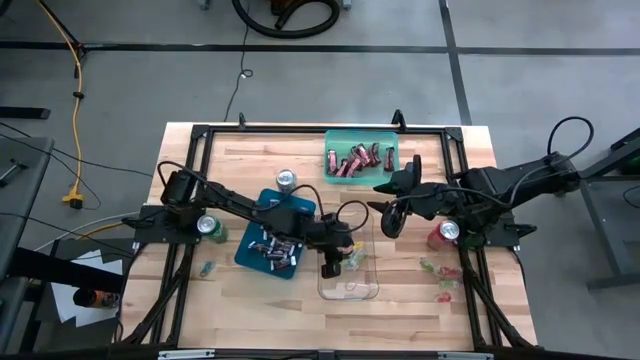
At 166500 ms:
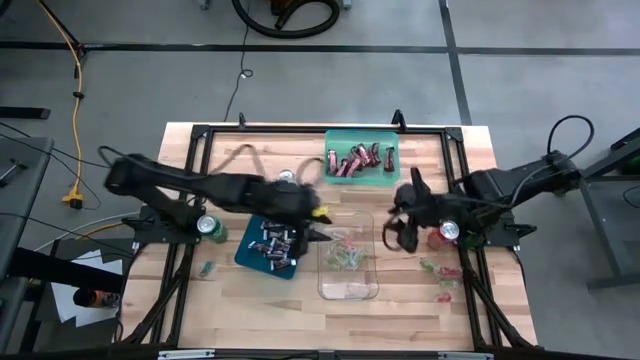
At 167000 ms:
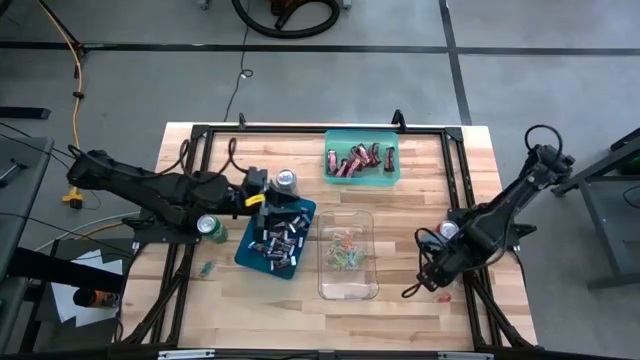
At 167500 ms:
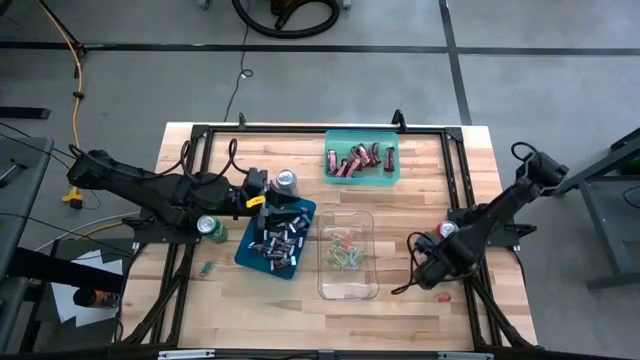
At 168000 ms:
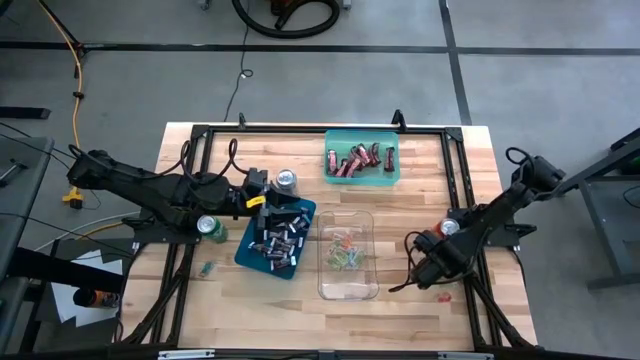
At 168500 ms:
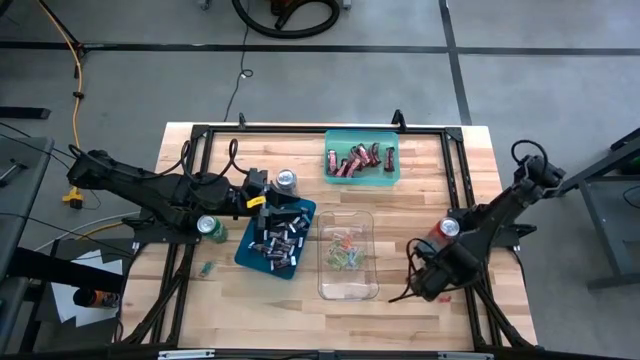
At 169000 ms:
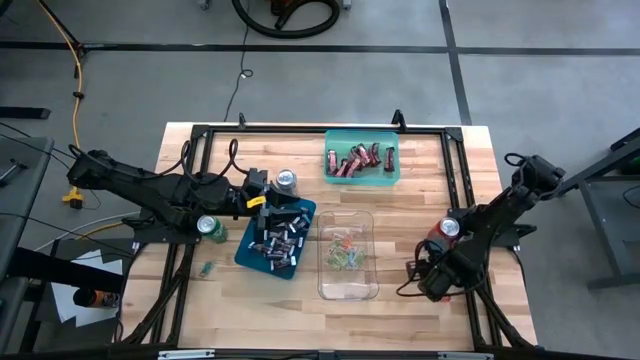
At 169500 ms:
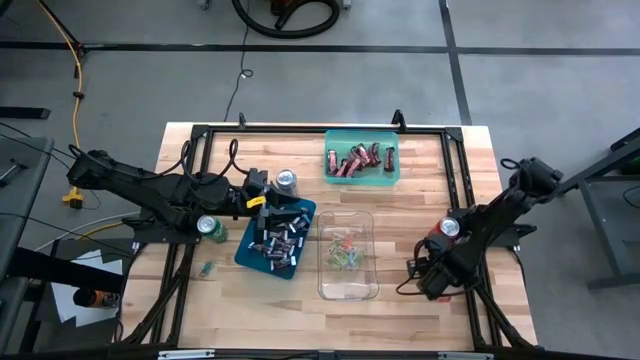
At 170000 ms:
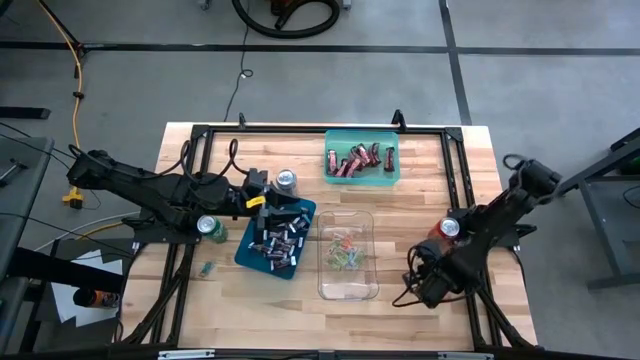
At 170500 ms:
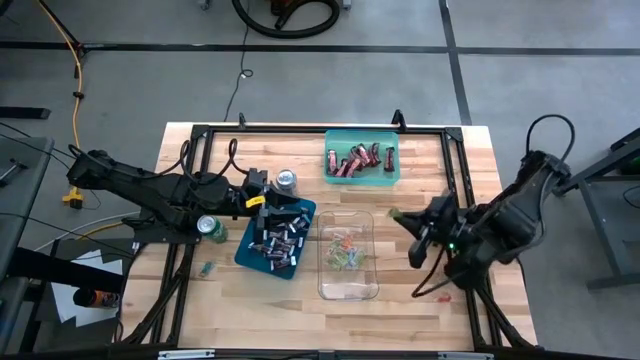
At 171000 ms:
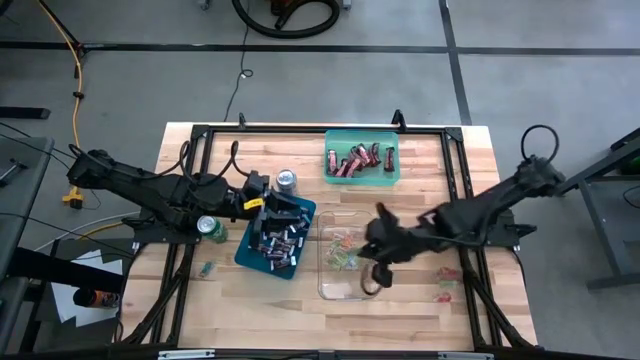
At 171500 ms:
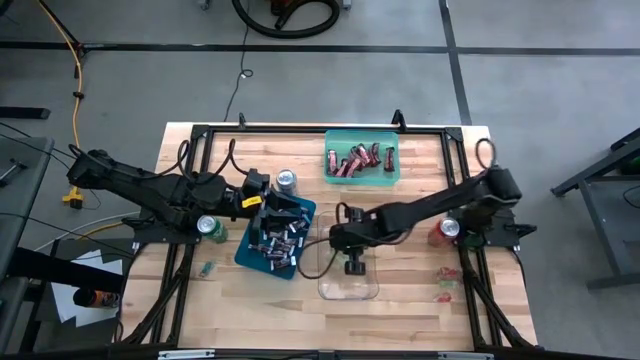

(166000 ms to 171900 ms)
Task: Sort candy
Put the green candy into the transparent bin

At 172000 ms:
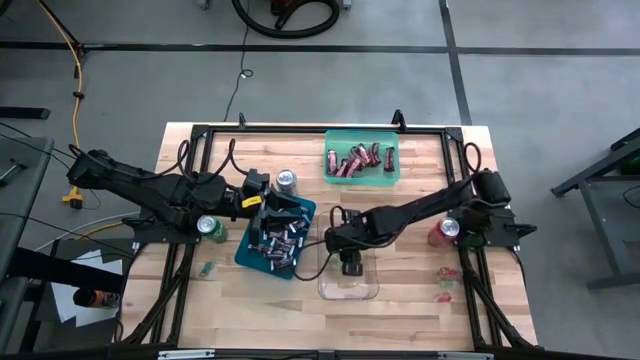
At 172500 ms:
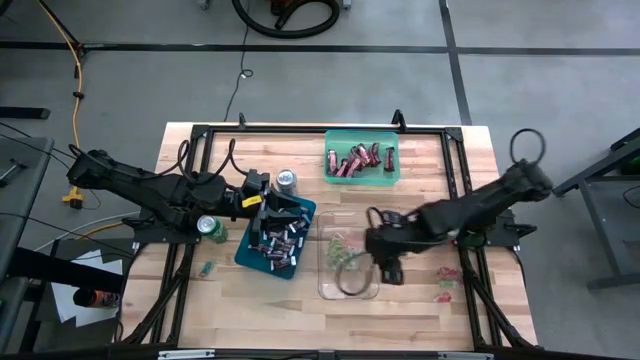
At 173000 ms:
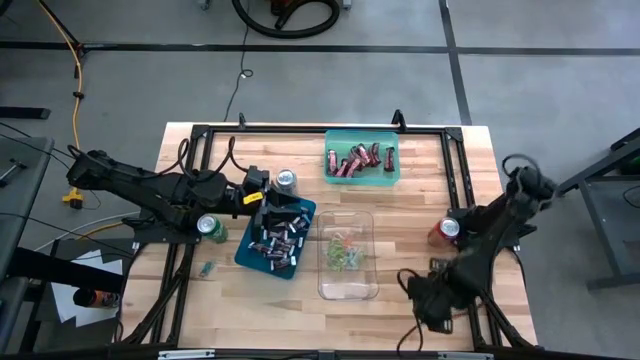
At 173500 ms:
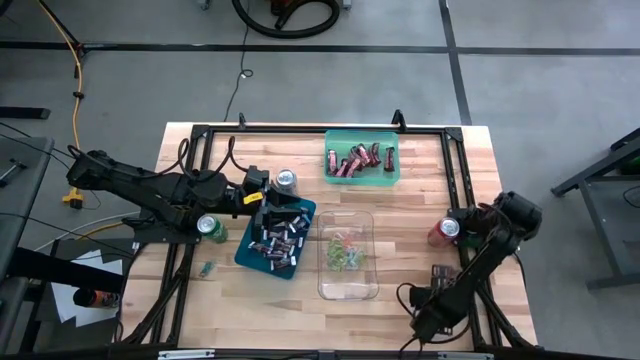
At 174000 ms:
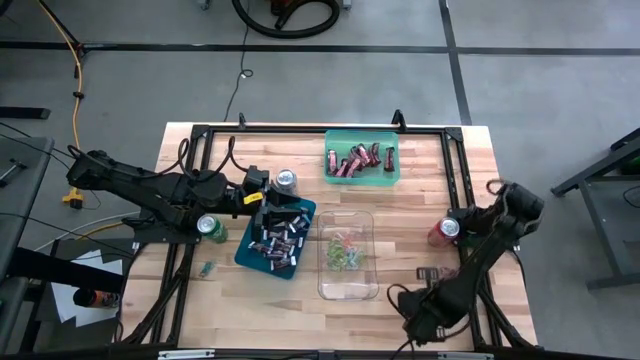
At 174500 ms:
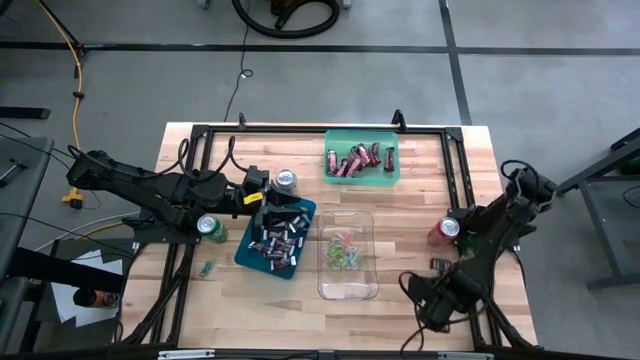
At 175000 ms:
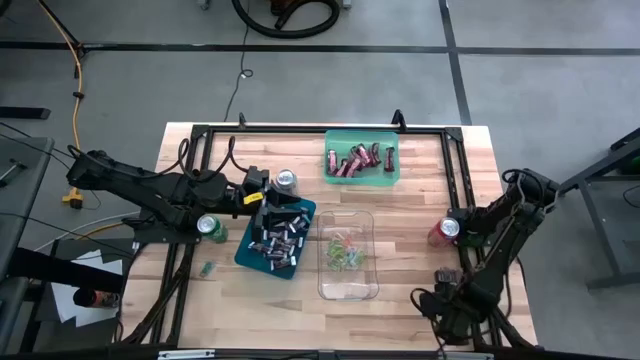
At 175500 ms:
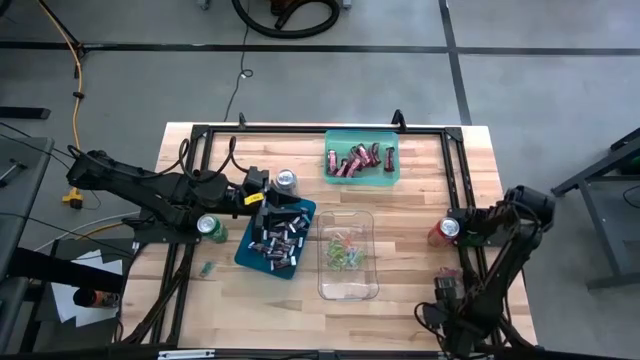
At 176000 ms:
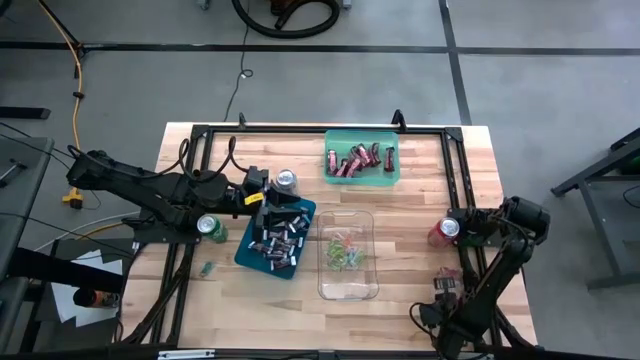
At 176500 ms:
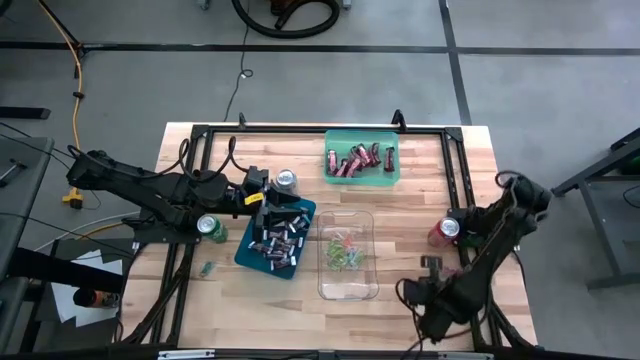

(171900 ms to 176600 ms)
Put the orange candy into the transparent bin

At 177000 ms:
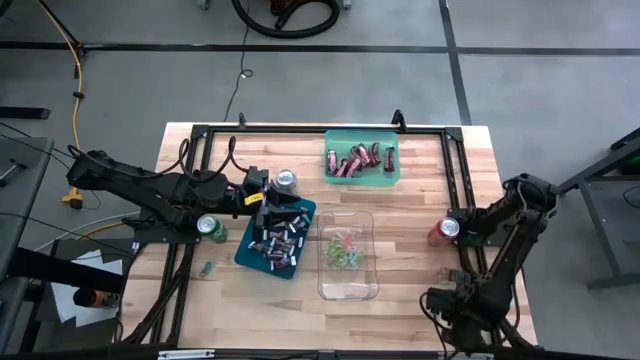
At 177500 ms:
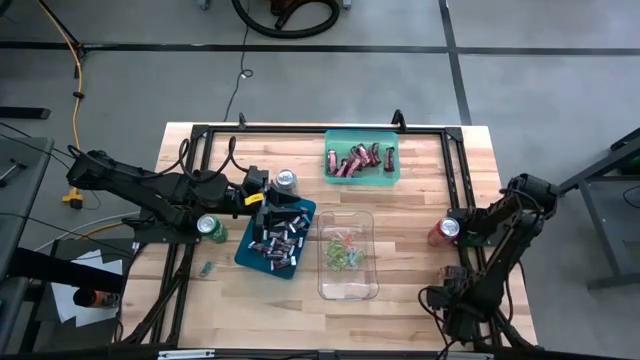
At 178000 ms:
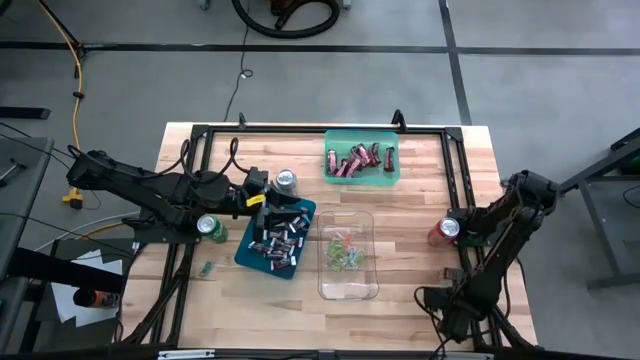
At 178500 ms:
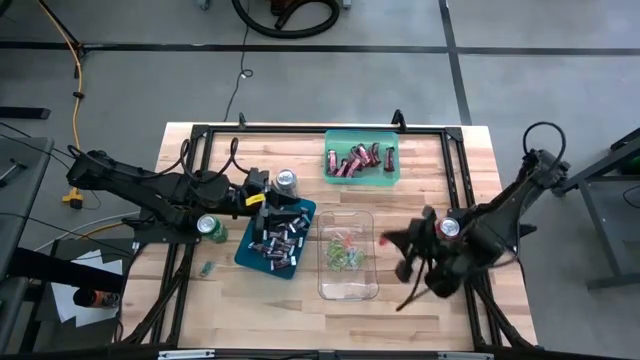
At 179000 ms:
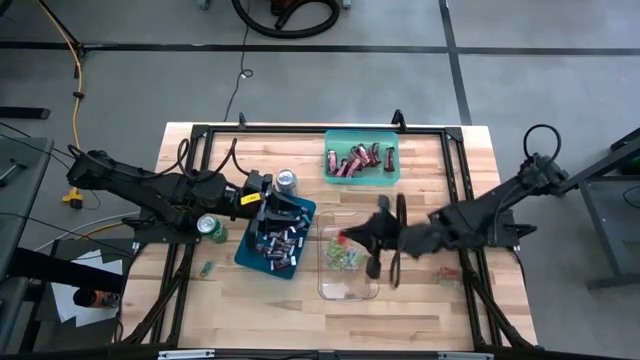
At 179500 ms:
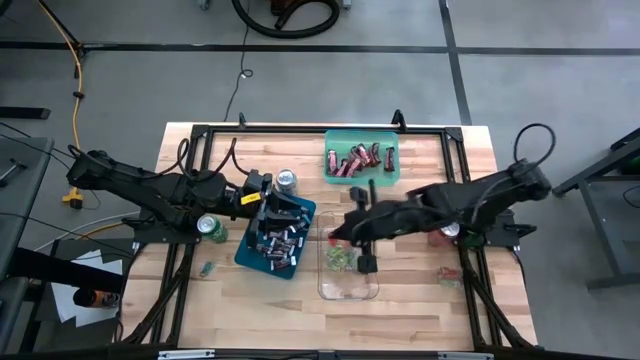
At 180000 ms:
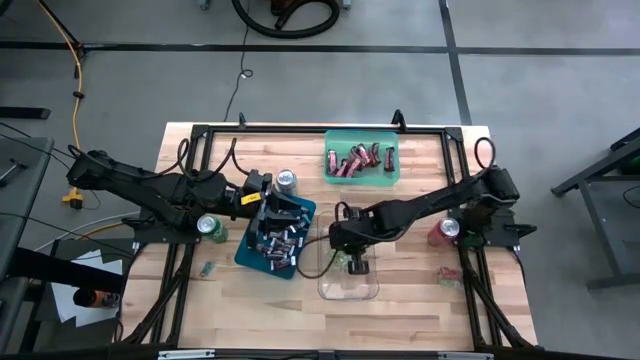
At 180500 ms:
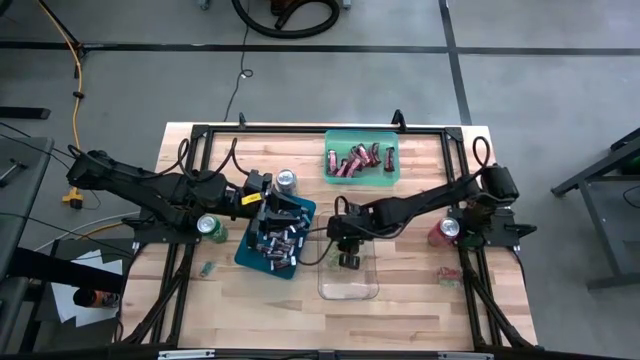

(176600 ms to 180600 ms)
Put the orange candy into the transparent bin

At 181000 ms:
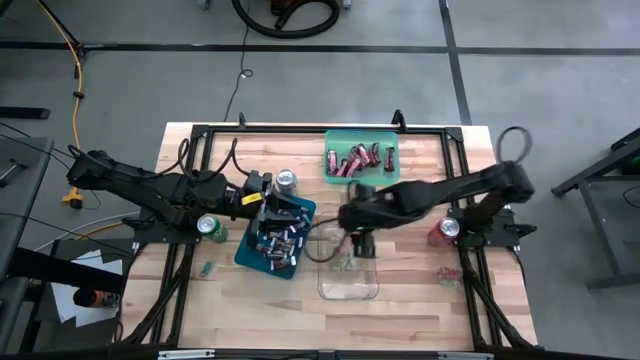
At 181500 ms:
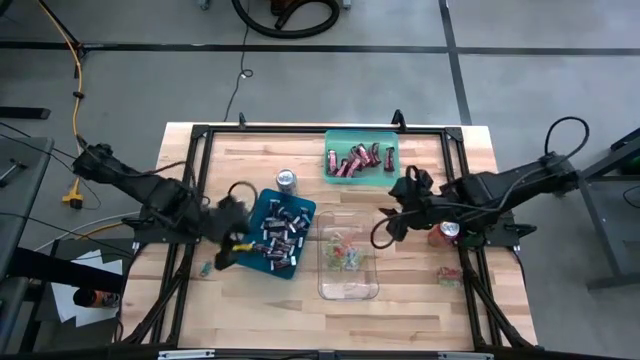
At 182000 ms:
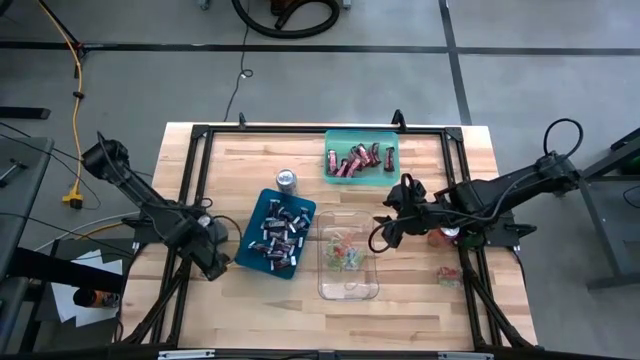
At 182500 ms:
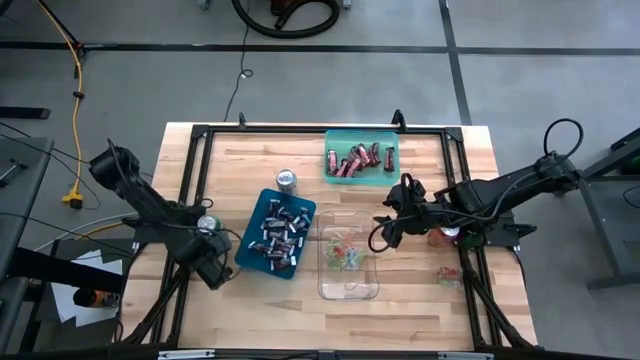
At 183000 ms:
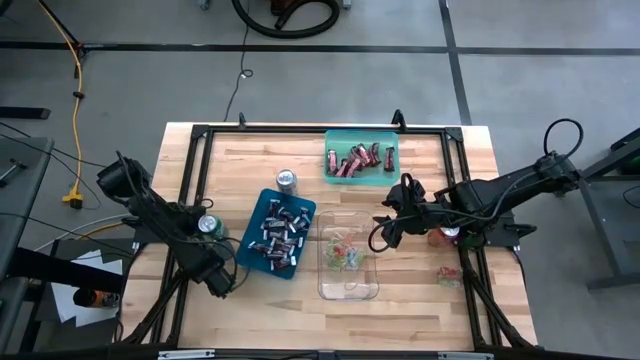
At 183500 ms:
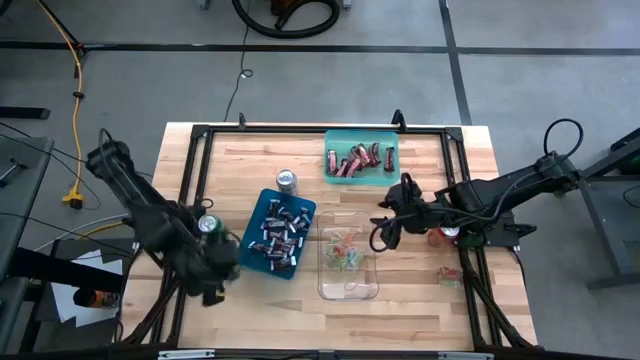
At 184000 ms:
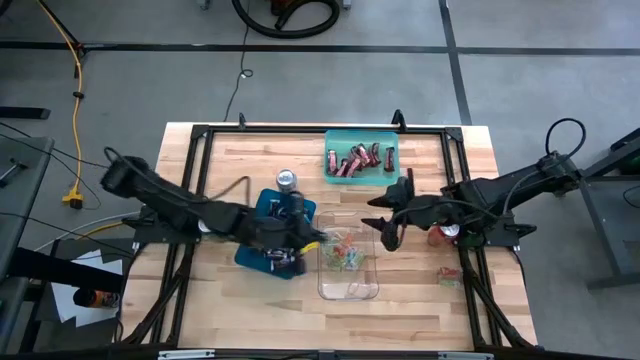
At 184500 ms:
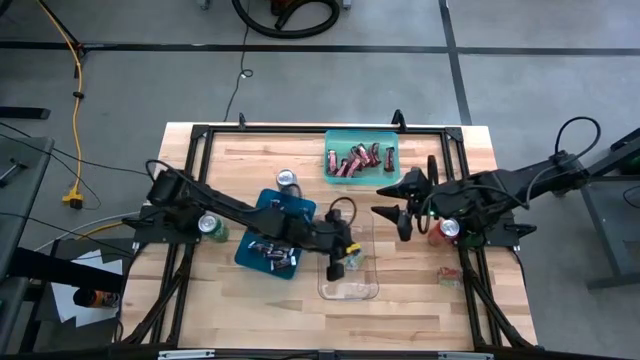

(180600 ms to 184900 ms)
Put the blue candy into the transparent bin

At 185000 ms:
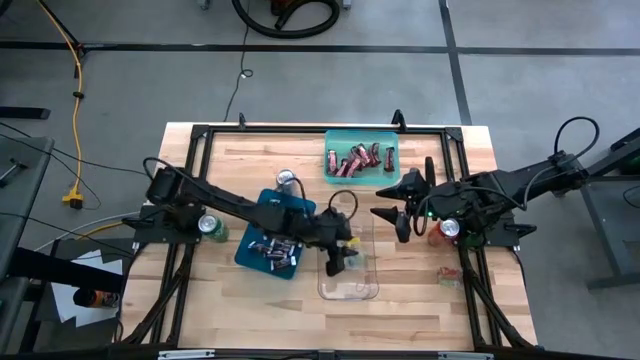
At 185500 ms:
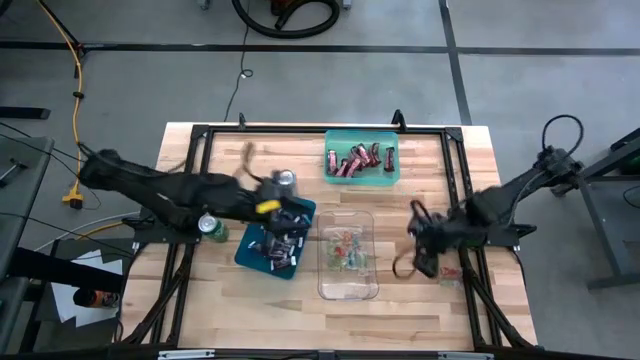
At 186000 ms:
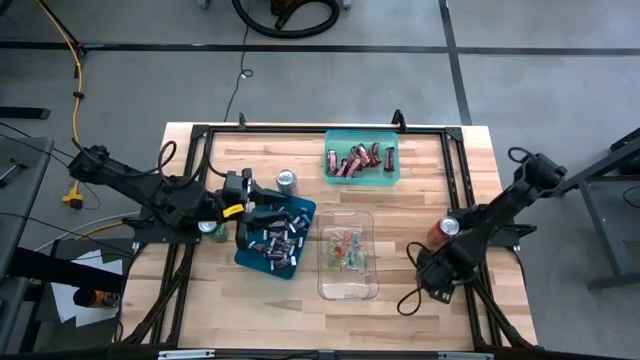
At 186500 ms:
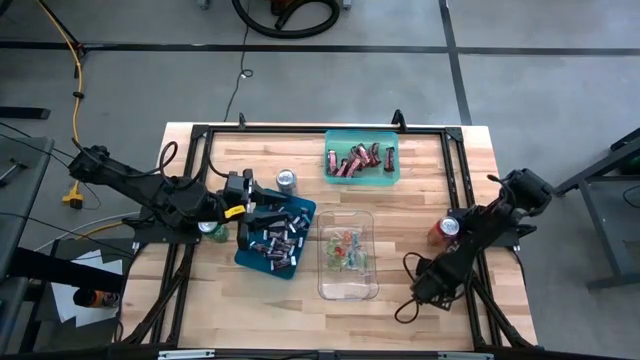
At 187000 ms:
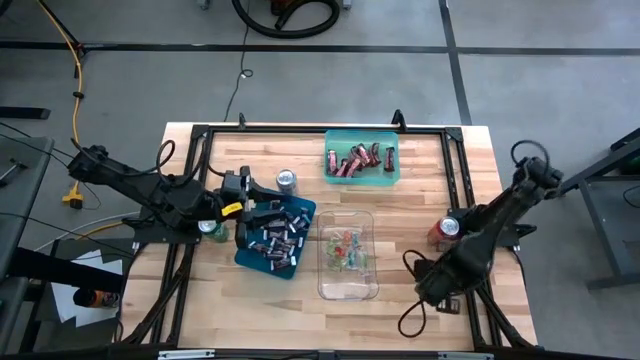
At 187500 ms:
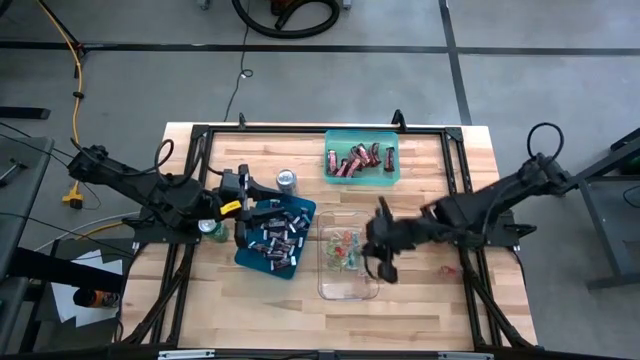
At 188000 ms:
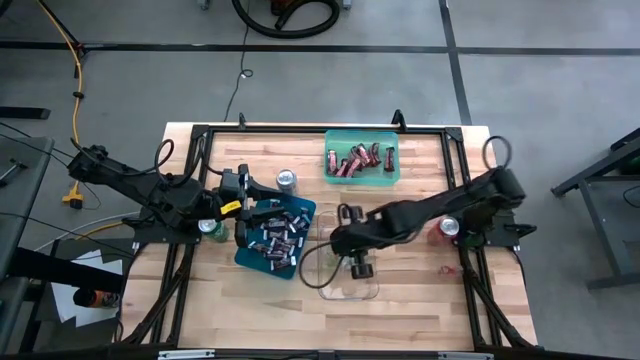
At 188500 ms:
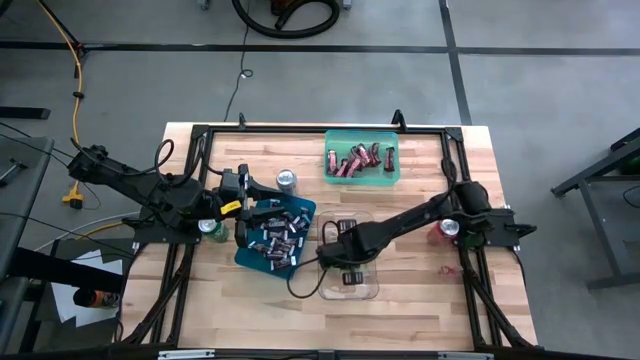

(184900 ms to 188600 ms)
Put the green candy into the transparent bin
